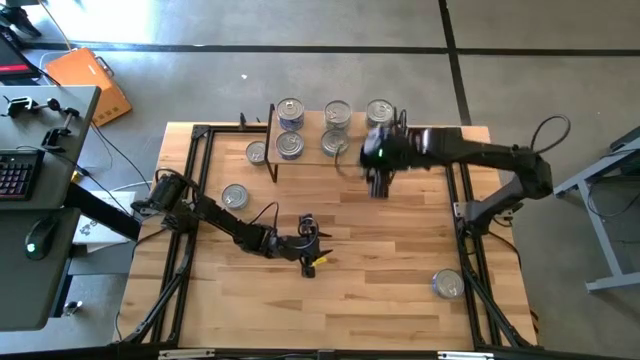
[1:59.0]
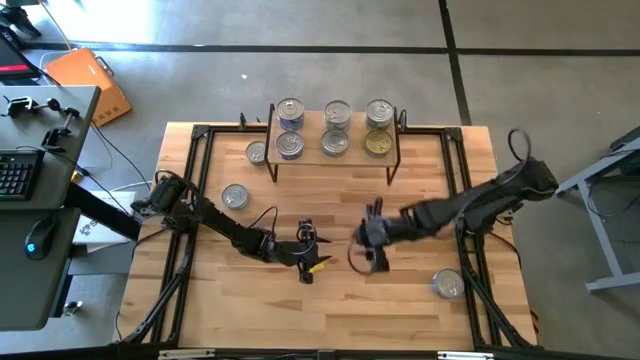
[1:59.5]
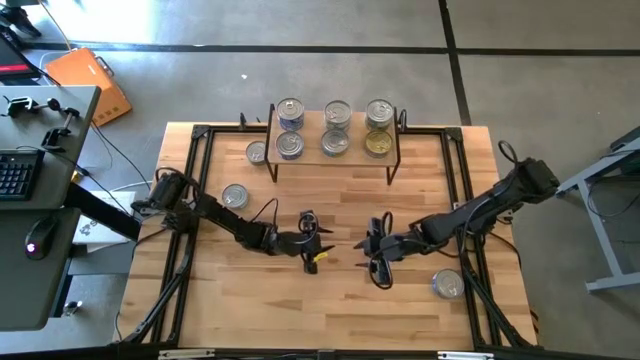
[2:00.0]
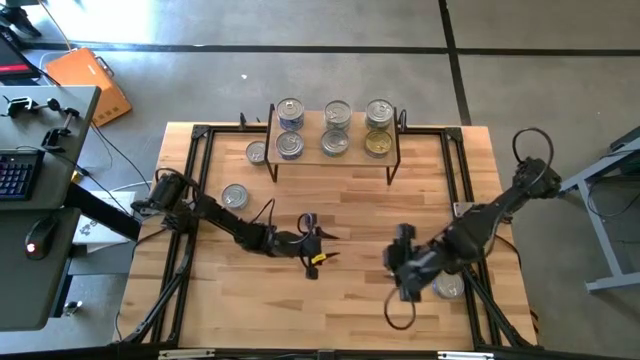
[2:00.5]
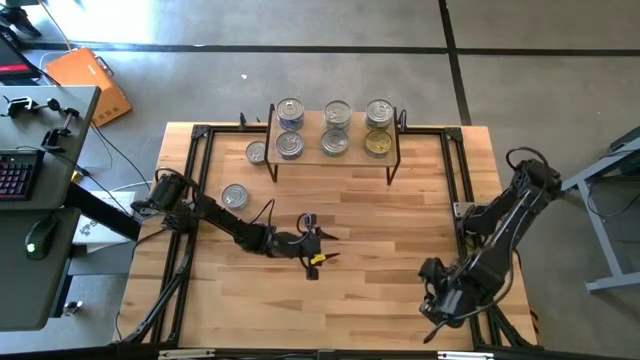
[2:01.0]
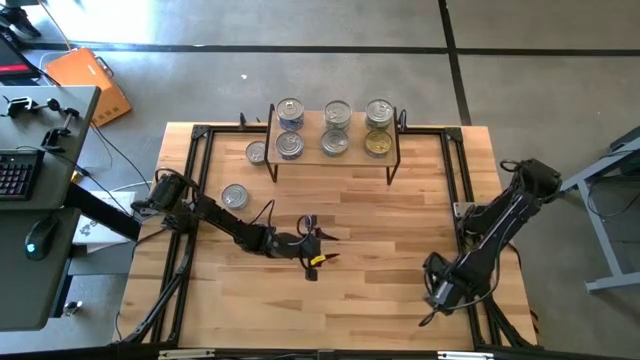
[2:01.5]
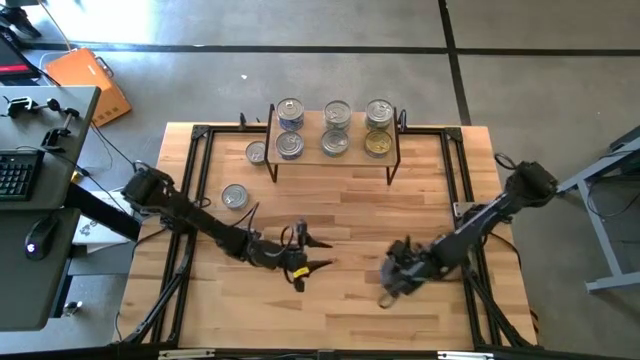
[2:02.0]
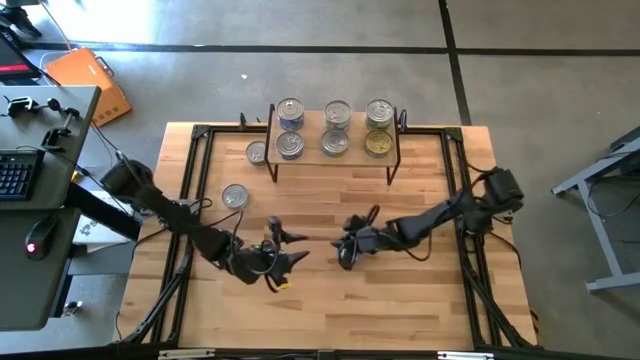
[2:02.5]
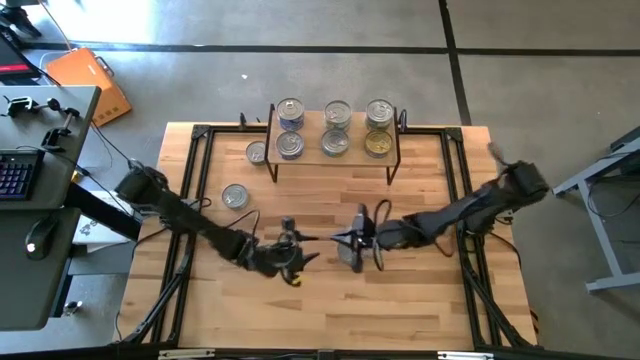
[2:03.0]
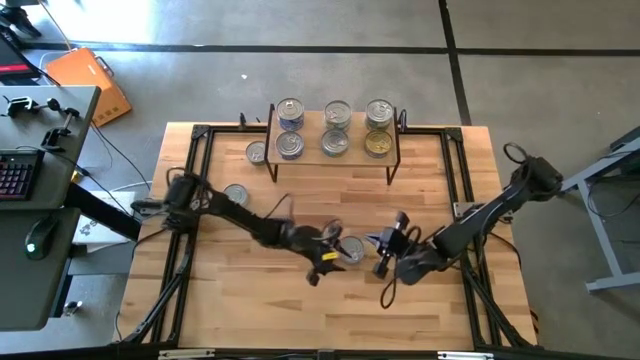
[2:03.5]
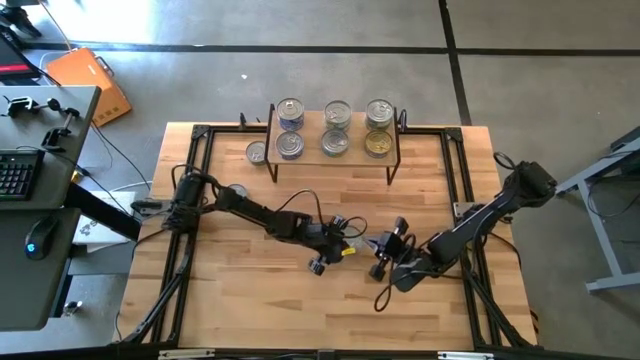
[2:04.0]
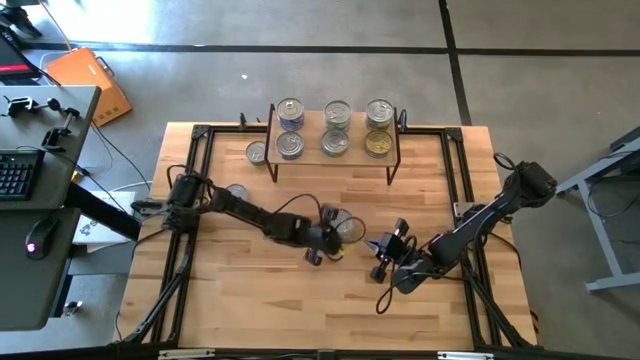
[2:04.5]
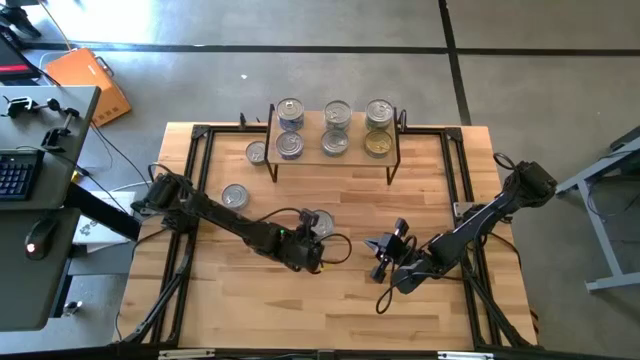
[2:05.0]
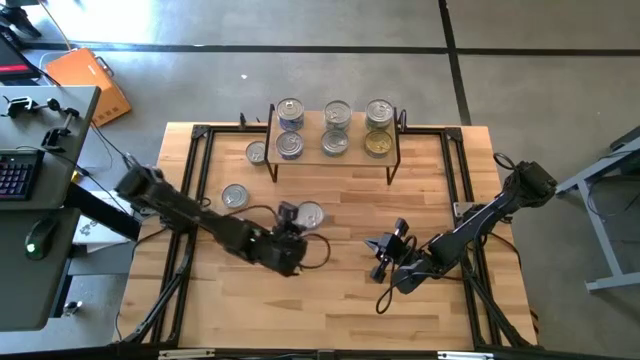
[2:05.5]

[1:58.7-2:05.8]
Task: Stack canned seafood by type on shelf
Stack the blue tuna can on top of the other blue tuna on the shelf

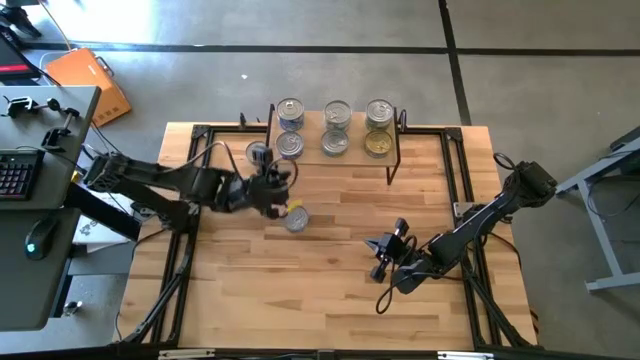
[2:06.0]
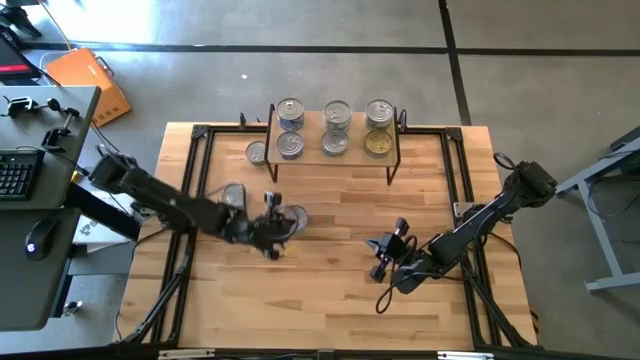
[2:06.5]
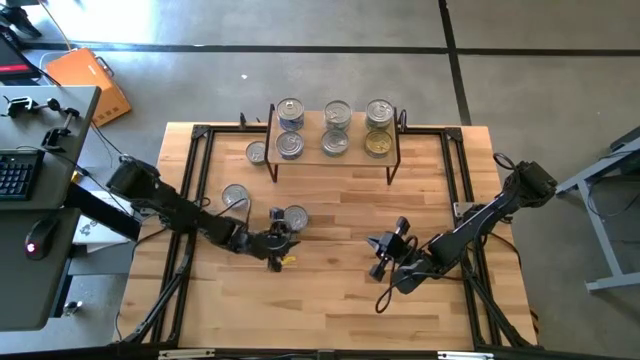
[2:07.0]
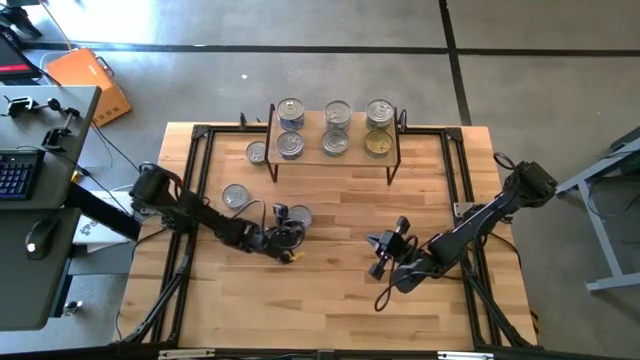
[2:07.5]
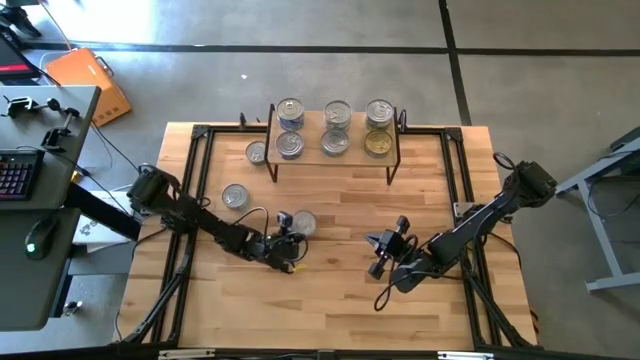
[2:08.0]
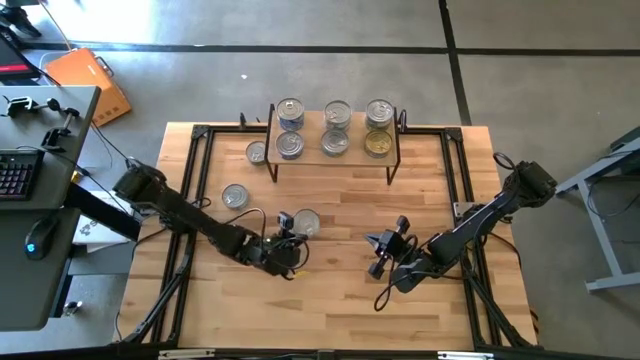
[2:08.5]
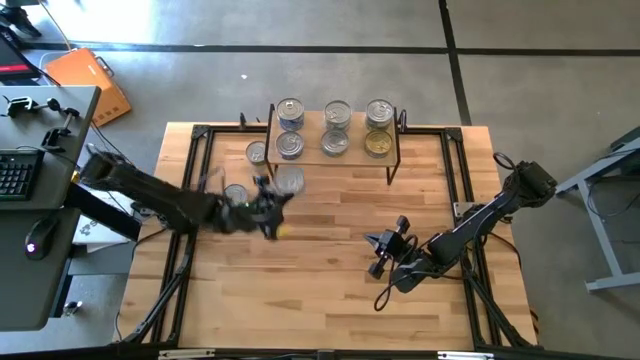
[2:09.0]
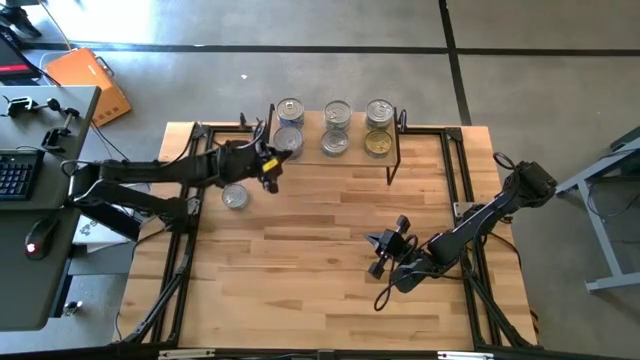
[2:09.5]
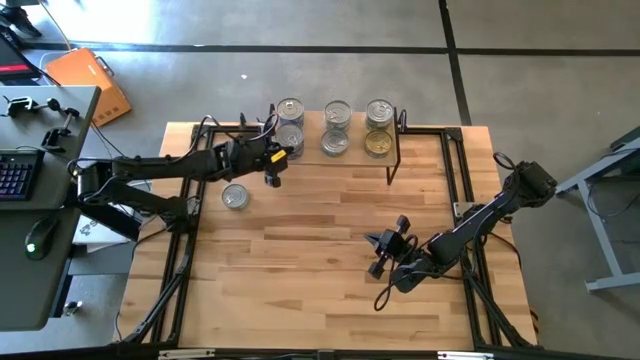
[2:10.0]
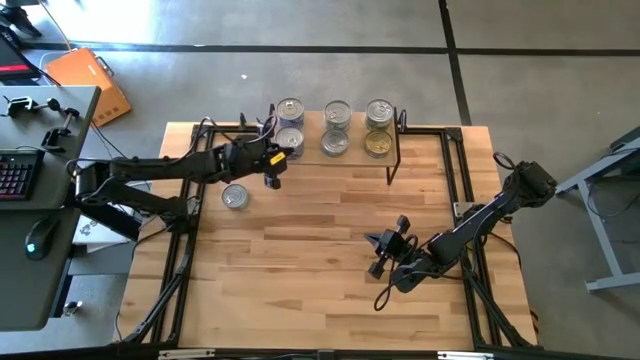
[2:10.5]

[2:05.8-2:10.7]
Stack the blue tuna can on top of the other blue tuna on the shelf

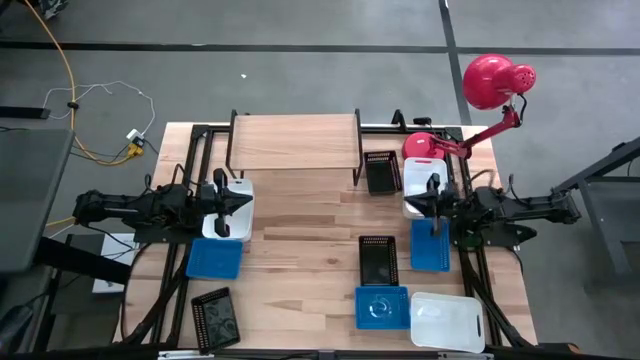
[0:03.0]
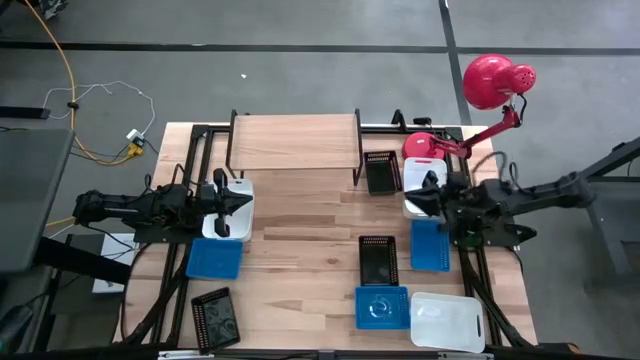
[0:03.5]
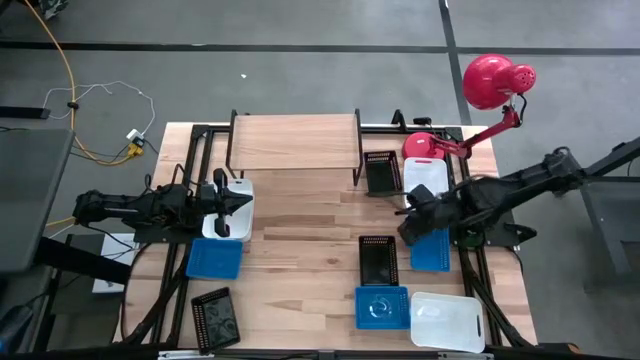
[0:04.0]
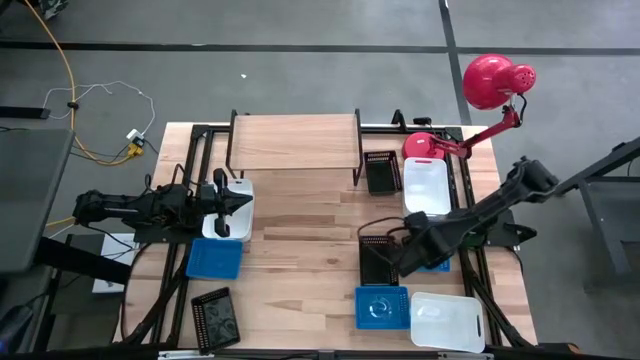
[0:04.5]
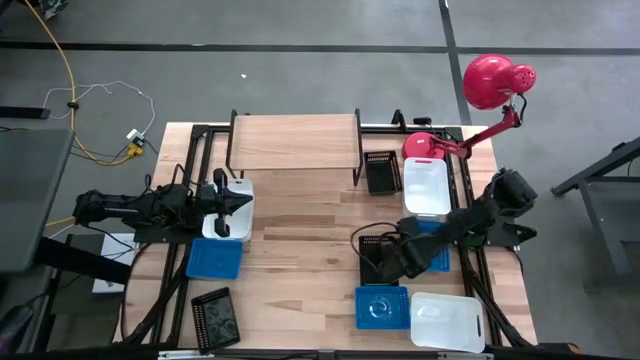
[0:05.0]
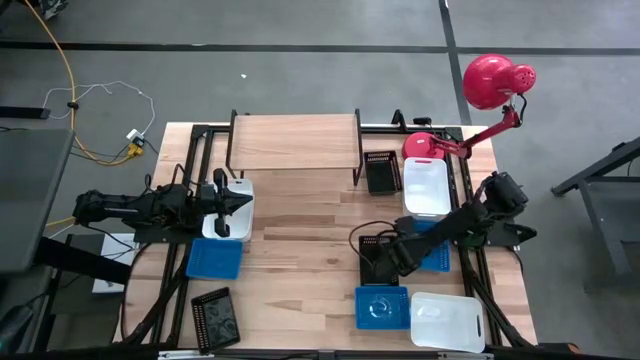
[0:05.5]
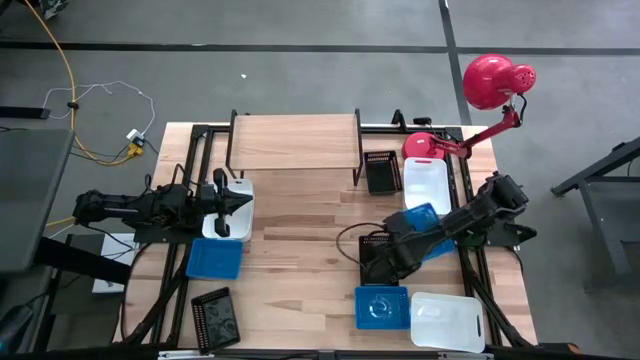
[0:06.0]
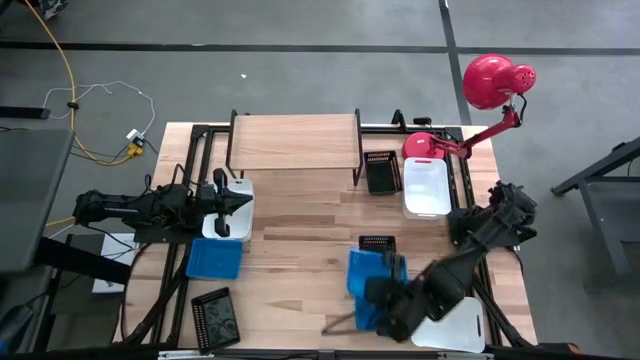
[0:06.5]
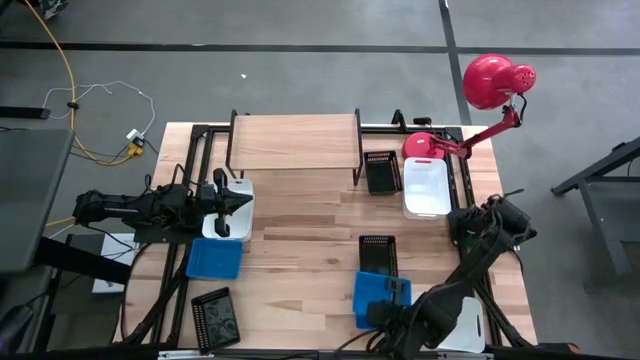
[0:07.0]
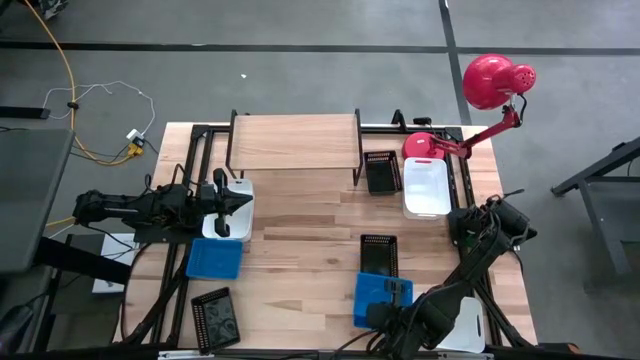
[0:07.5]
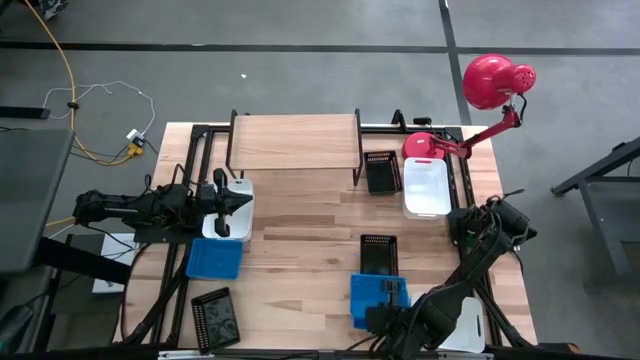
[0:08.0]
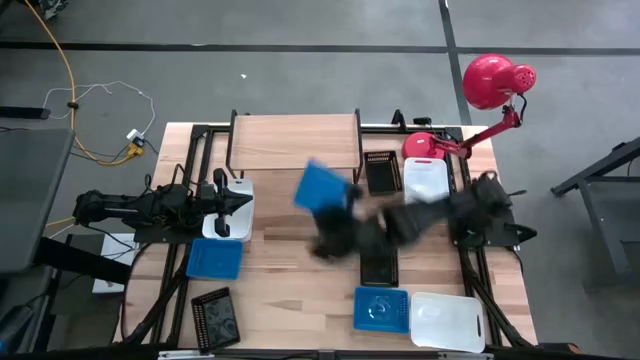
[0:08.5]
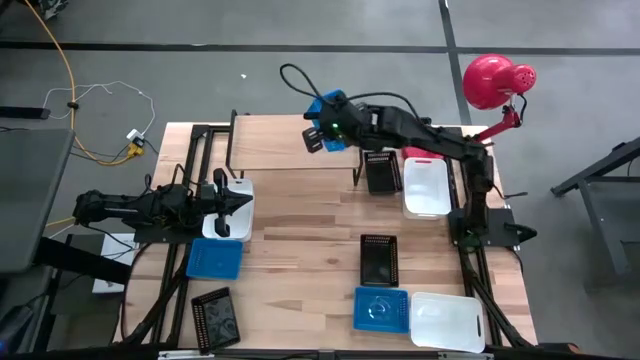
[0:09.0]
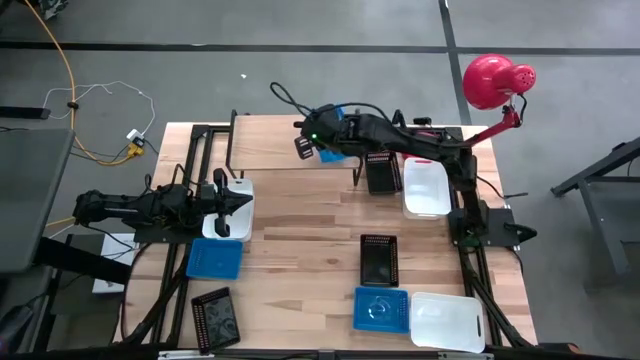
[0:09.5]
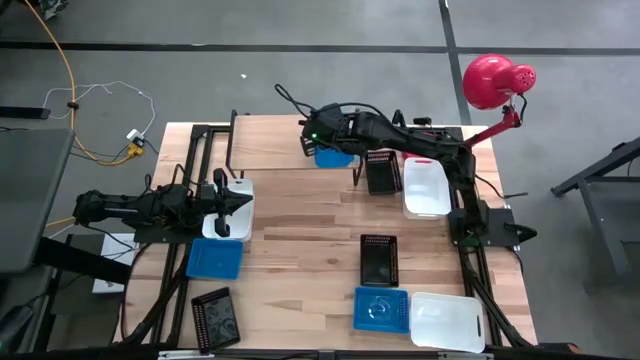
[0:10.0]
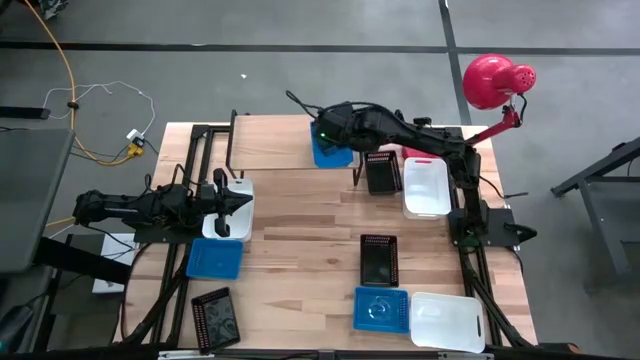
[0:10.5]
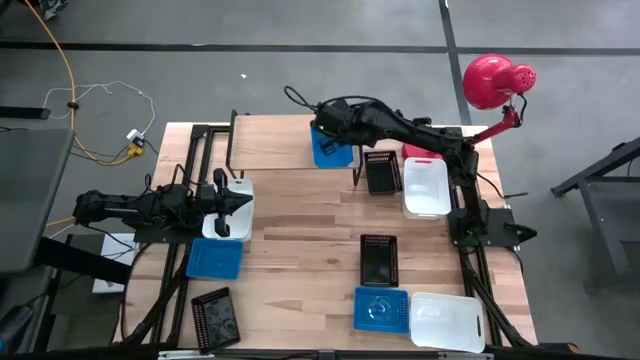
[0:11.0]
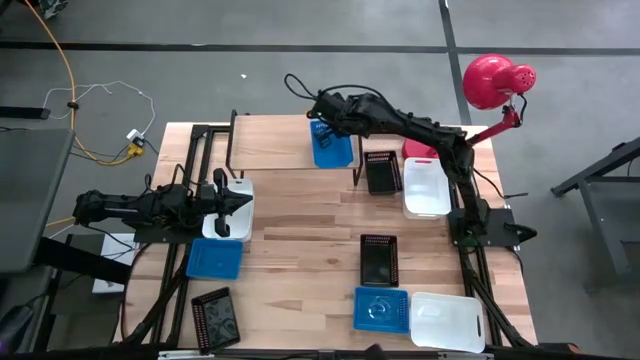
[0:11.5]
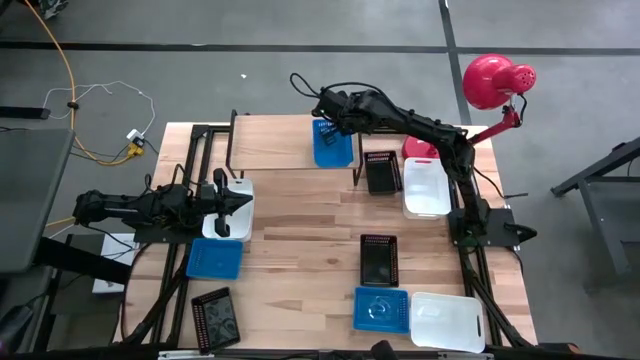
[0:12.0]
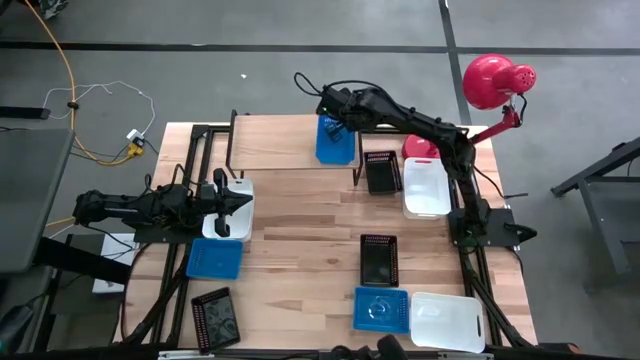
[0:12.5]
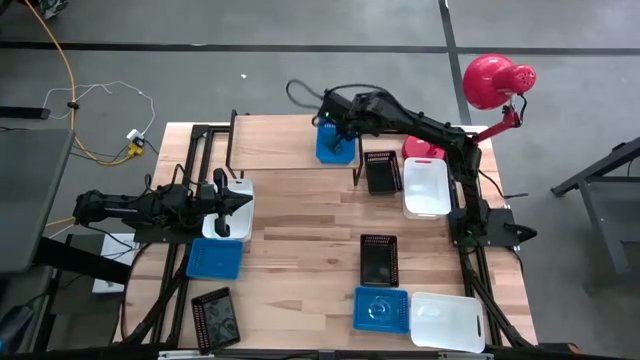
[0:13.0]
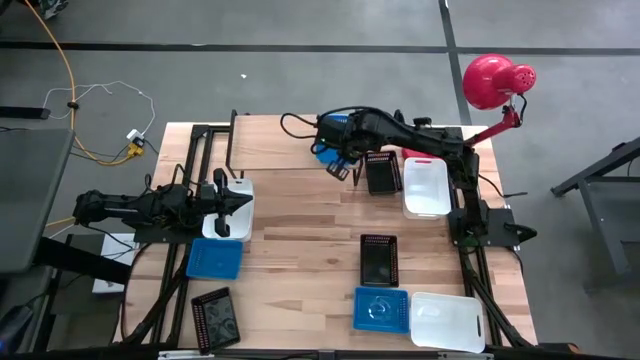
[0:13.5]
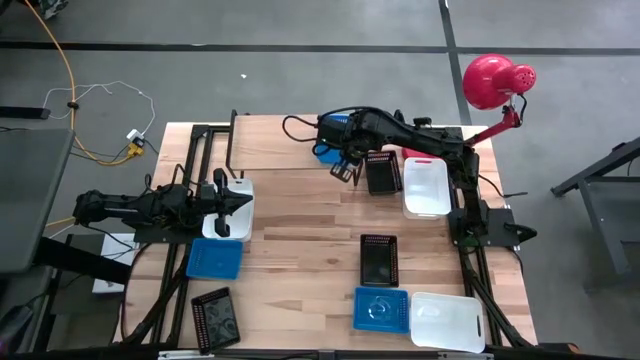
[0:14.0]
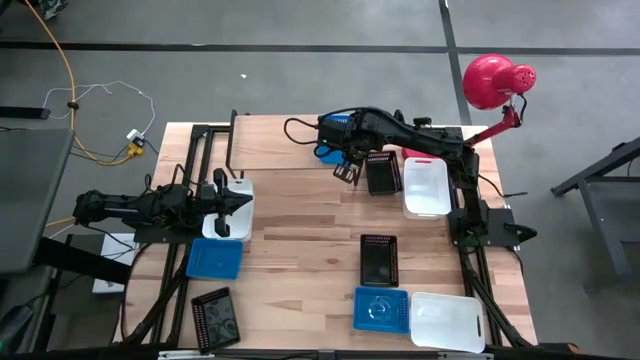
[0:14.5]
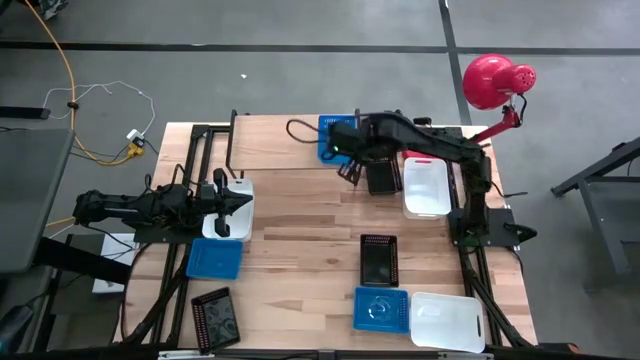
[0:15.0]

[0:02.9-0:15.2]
Task: Stack baskets on shelf by color
Put the top right blue bin on the shelf
